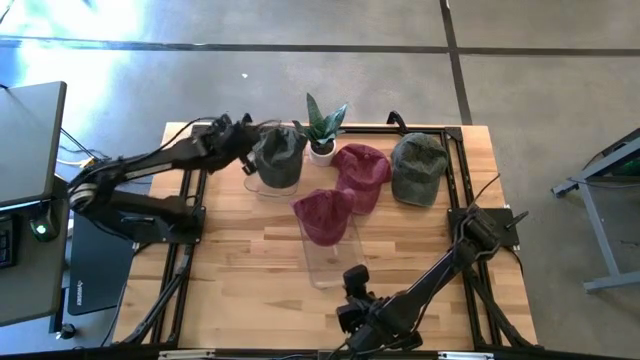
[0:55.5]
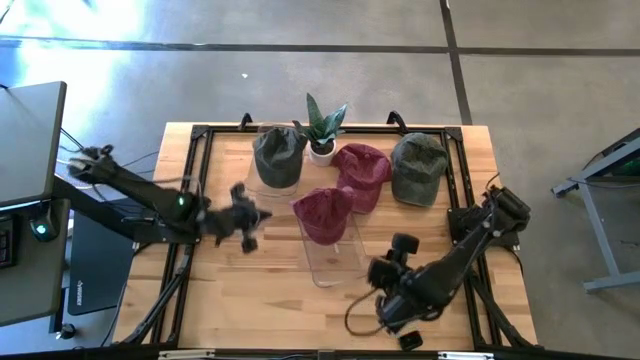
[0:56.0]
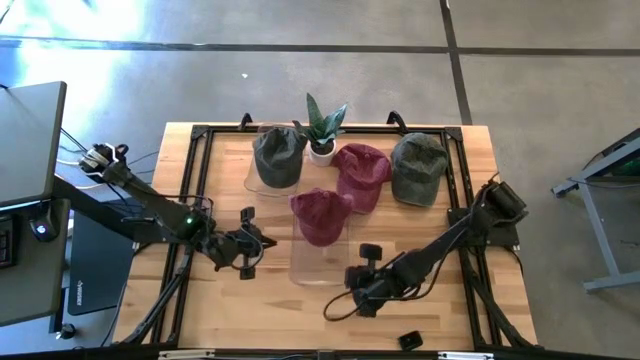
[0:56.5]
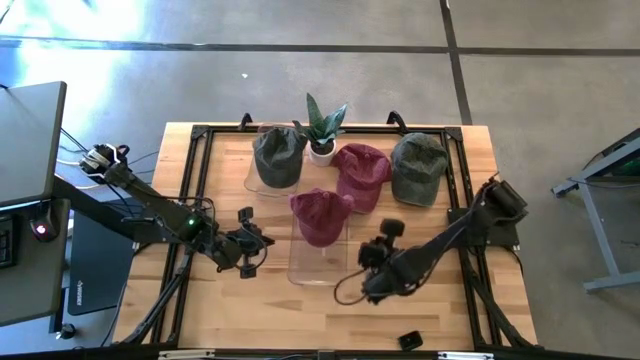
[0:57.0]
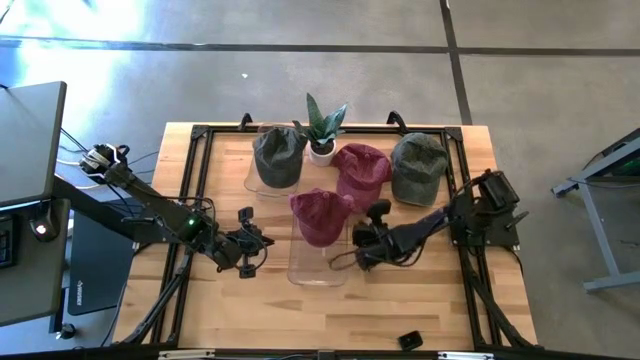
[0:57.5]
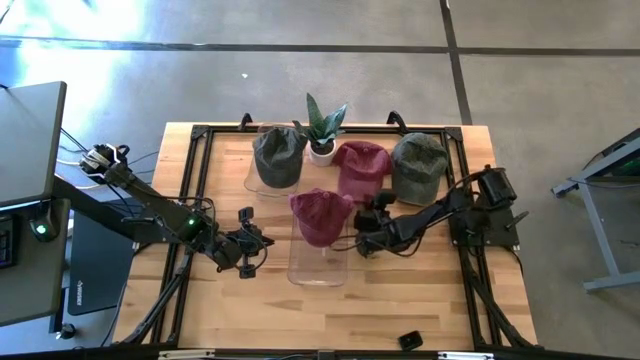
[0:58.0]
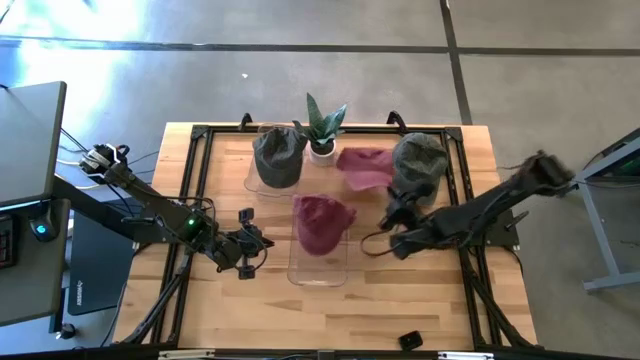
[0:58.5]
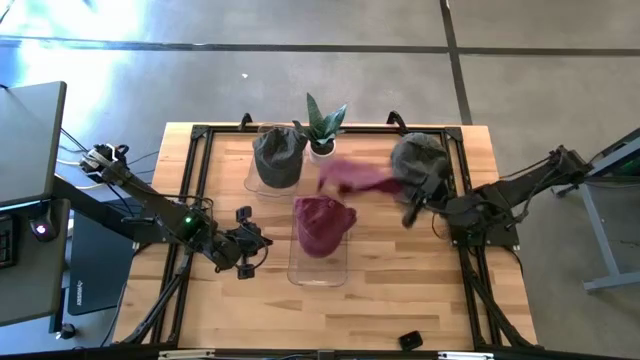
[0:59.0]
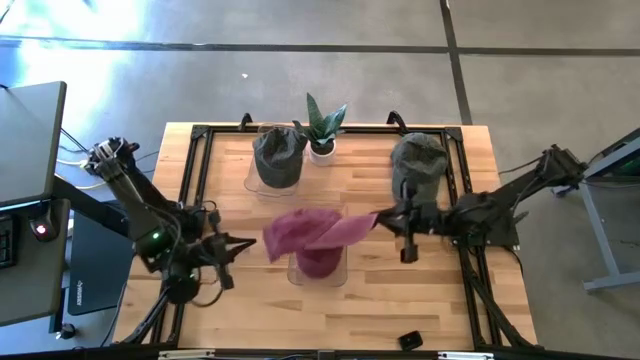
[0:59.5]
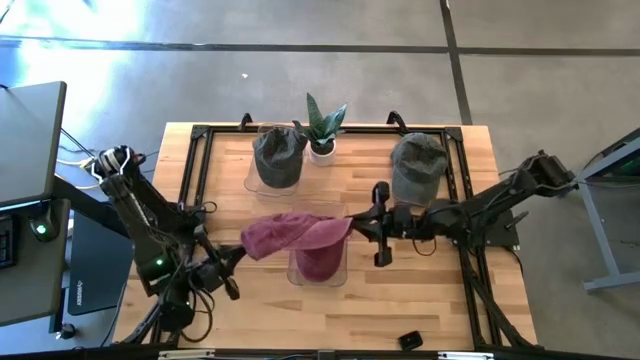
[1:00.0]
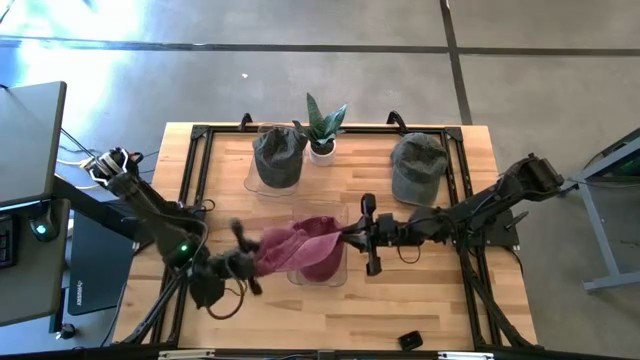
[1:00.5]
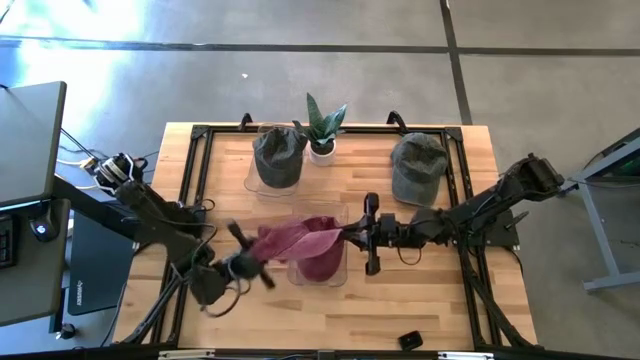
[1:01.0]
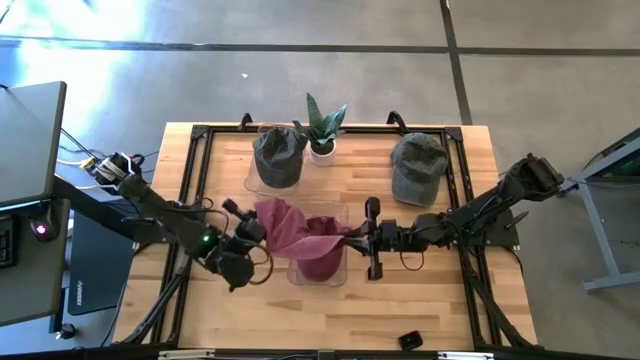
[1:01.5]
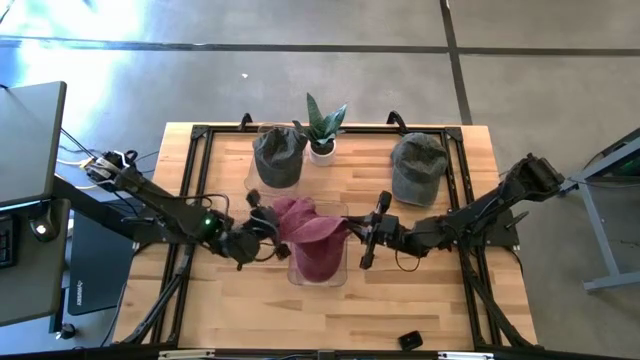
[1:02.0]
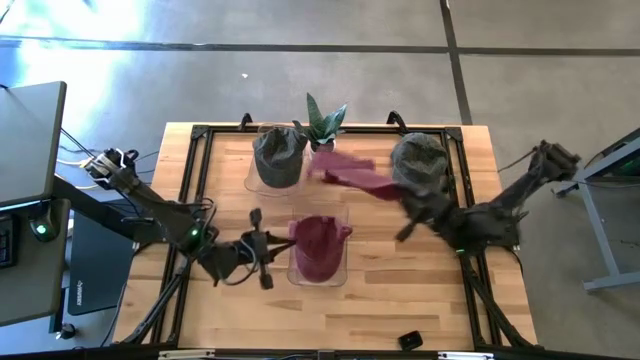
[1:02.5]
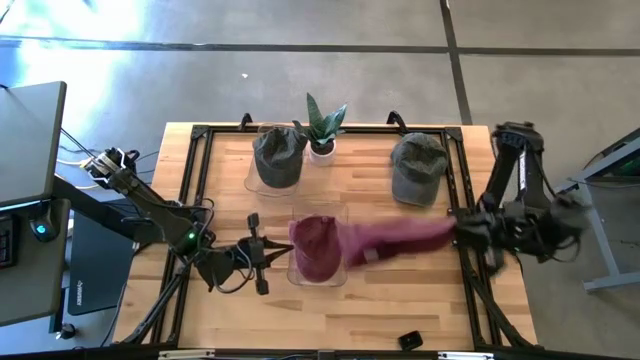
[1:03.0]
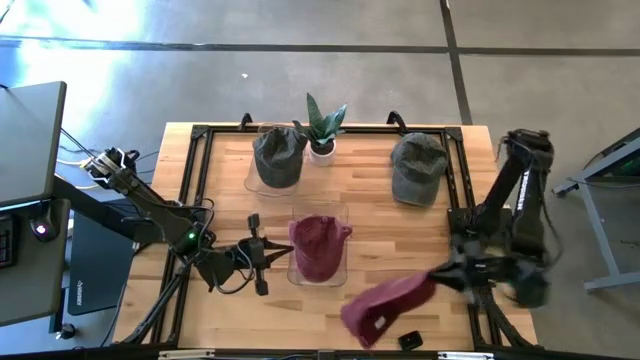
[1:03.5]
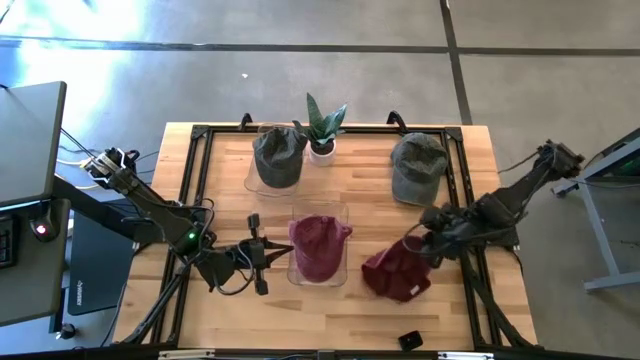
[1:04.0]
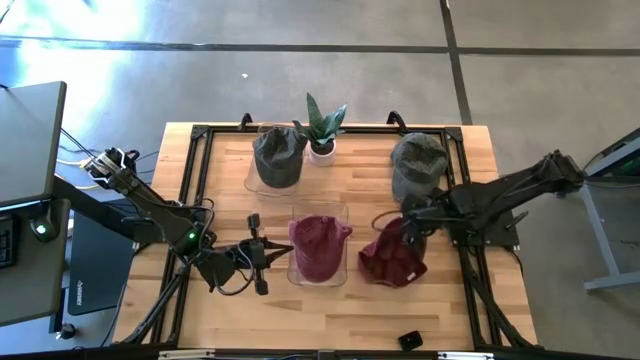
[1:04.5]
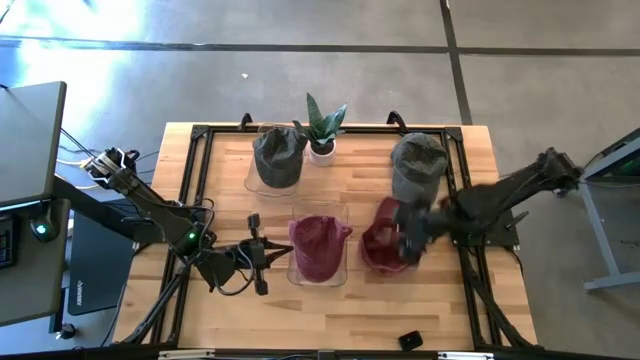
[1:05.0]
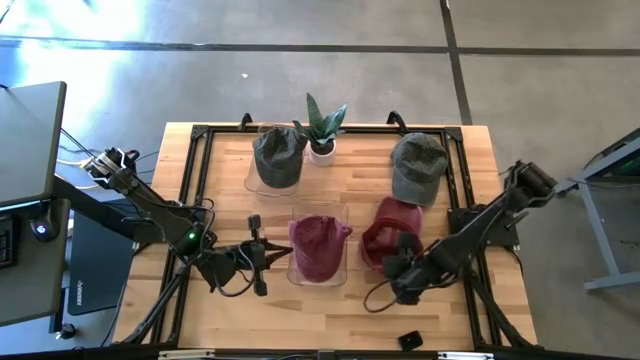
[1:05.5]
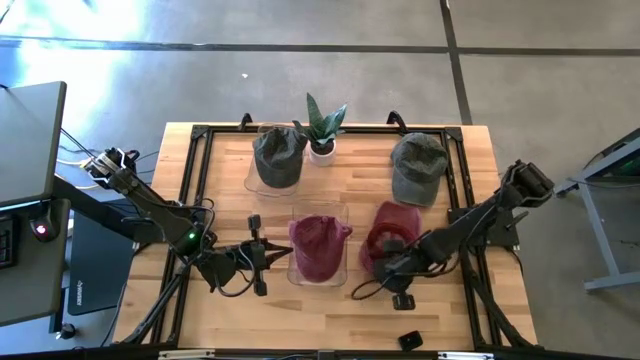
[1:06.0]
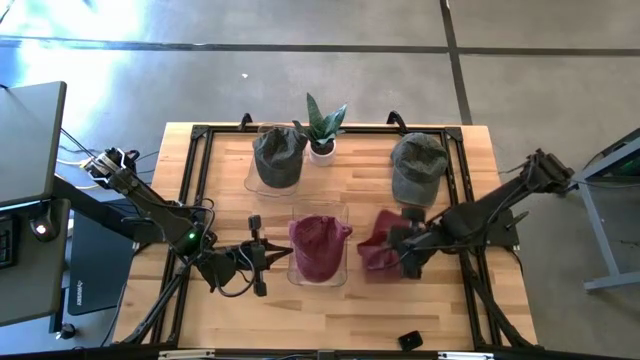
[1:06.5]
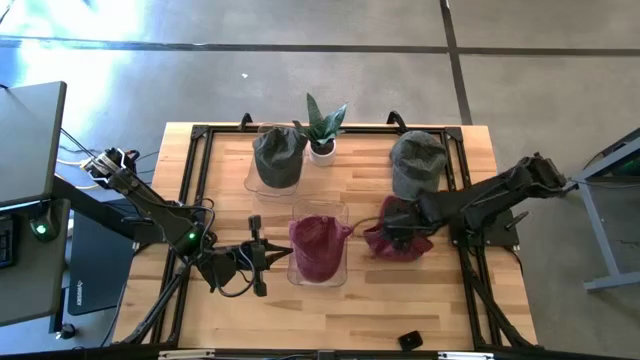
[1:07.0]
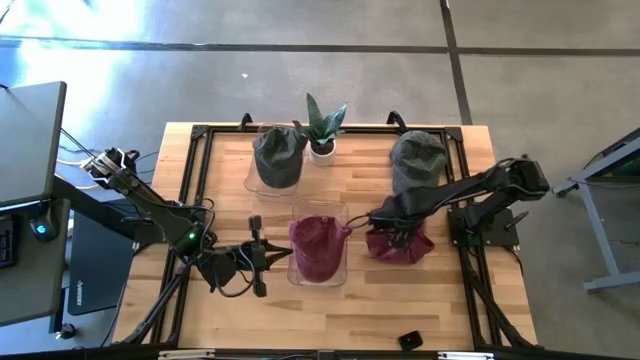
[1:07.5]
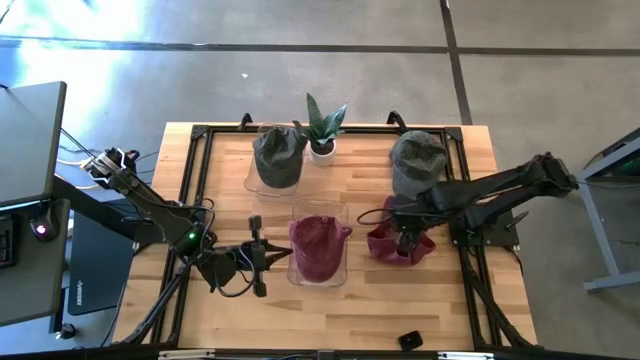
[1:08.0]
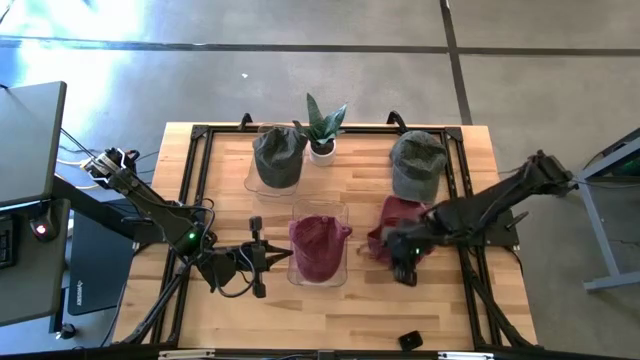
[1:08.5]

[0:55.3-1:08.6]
Task: Pick & Place hat
Put the red cap into the bottom transparent bin

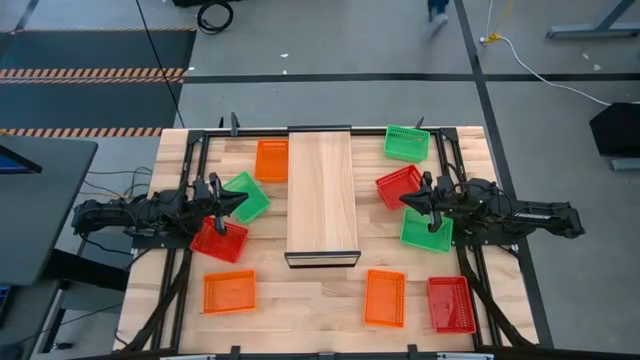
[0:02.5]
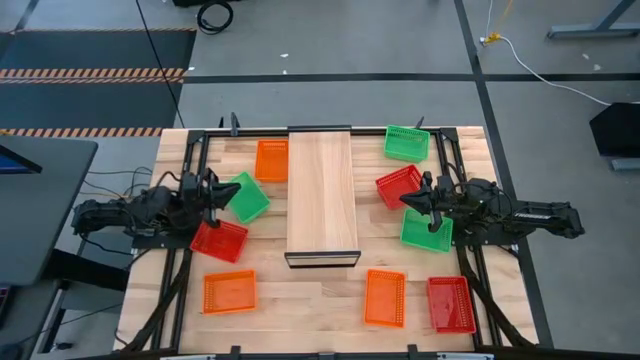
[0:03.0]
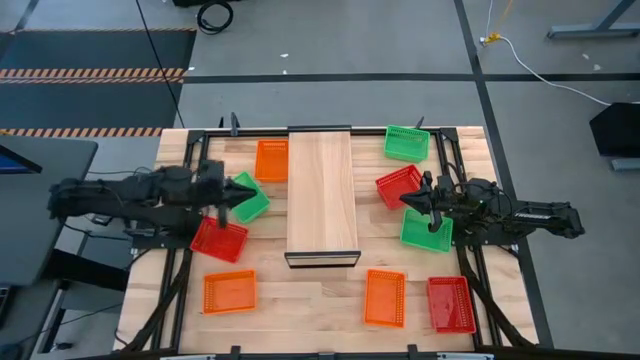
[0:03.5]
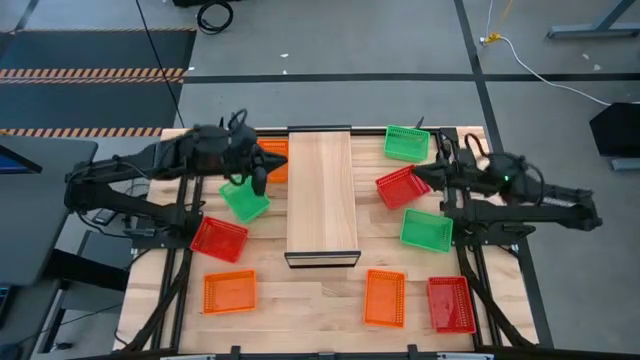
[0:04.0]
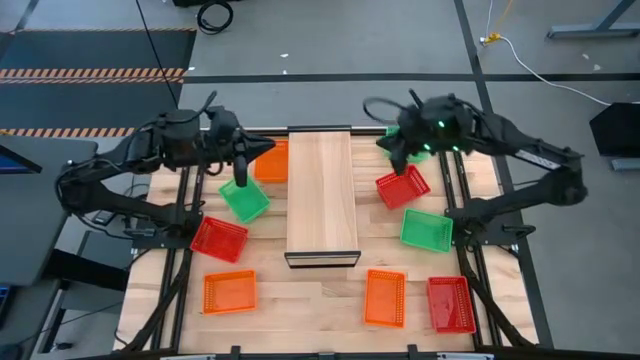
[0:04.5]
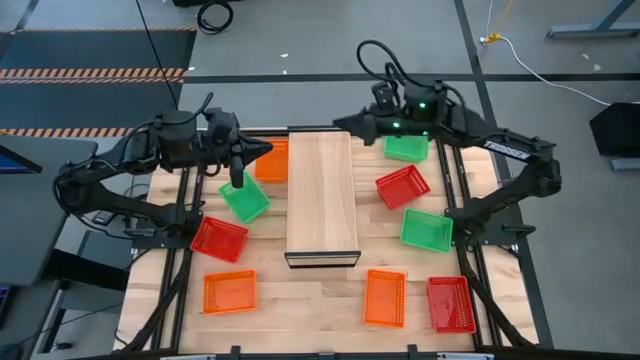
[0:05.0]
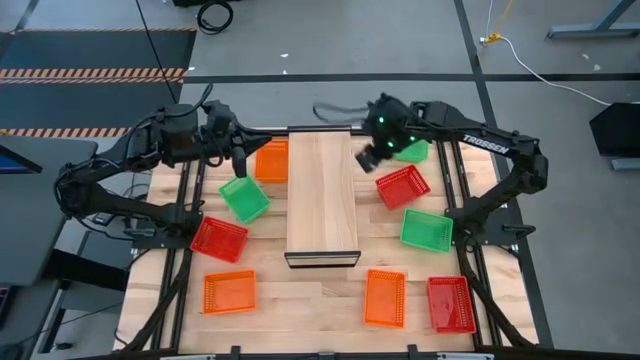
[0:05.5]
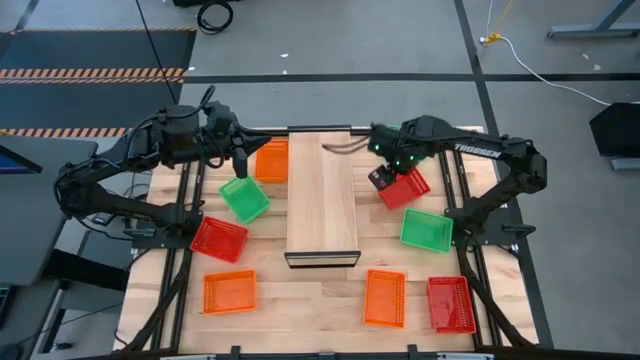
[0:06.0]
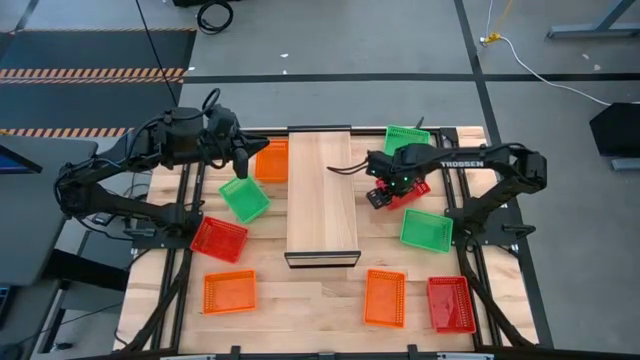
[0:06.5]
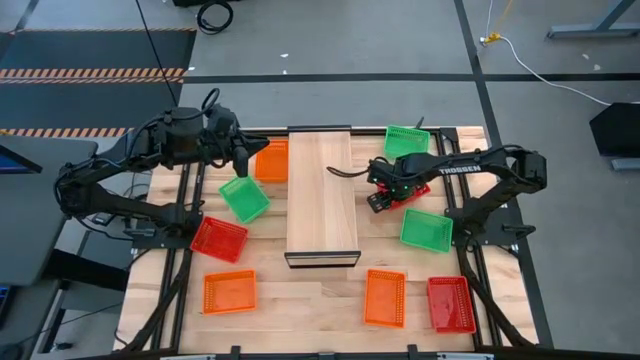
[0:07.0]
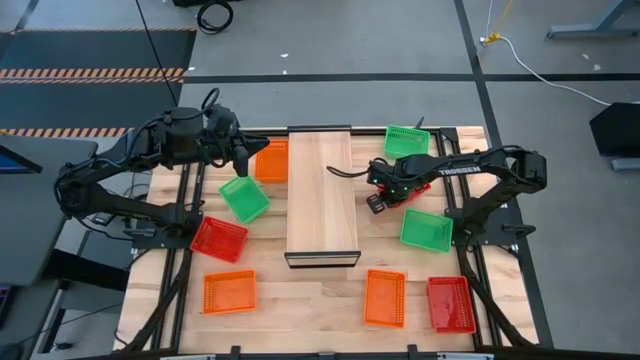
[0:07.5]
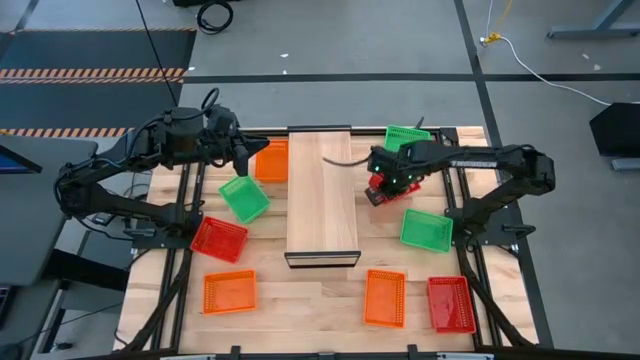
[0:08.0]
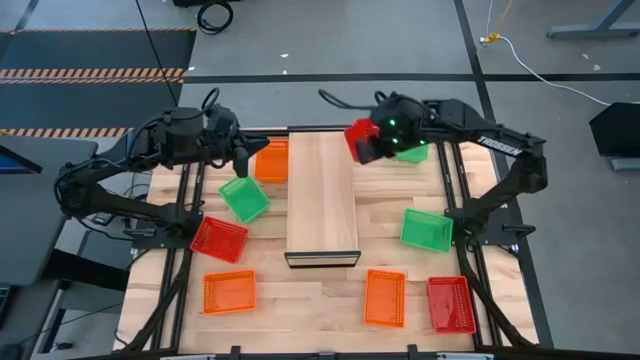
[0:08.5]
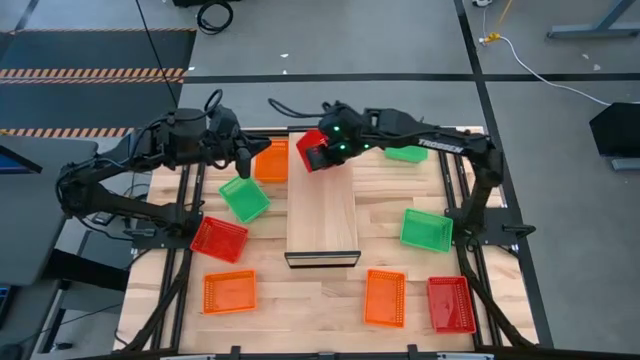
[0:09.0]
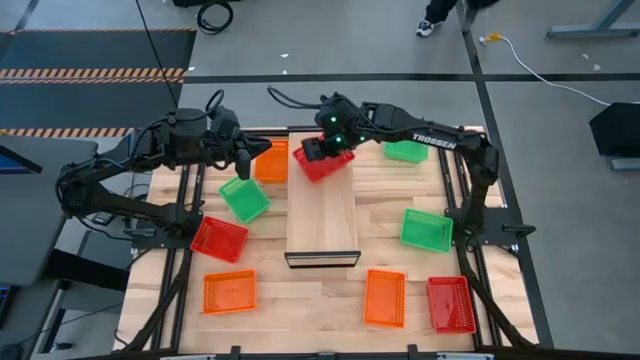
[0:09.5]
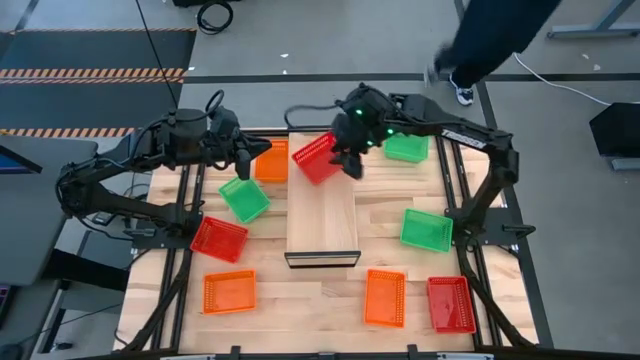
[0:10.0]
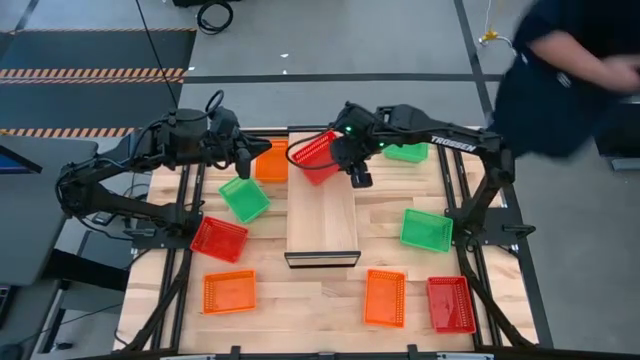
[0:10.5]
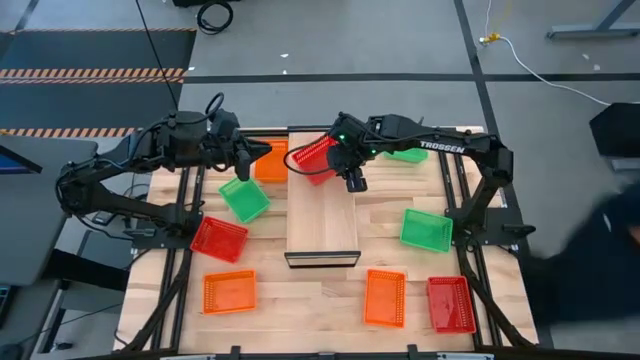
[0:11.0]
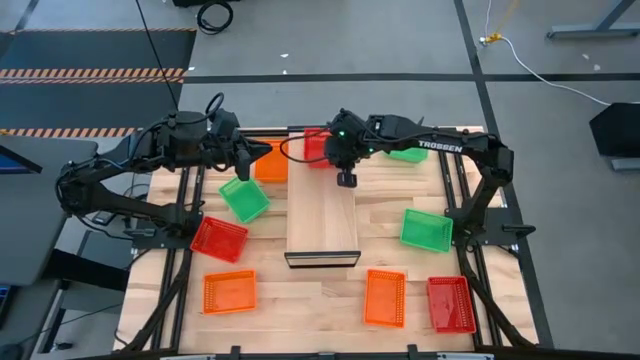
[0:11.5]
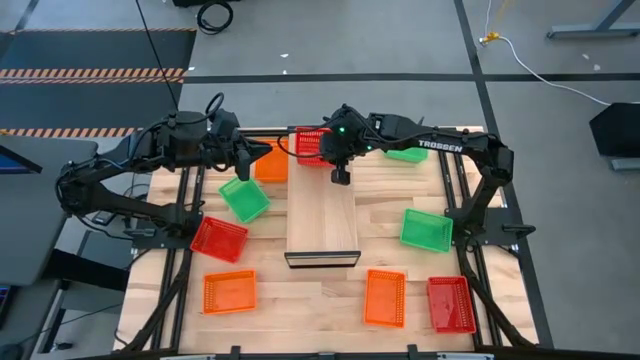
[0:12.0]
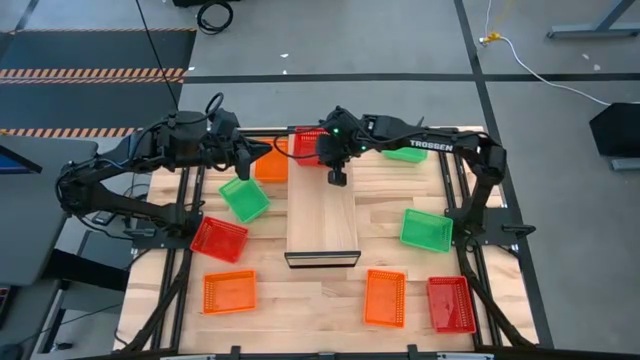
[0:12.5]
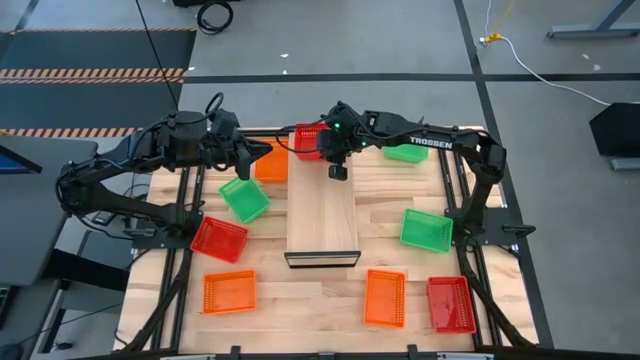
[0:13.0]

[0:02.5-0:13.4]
Task: Stack baskets on shelf by color
Put the top right red basket on the shelf
